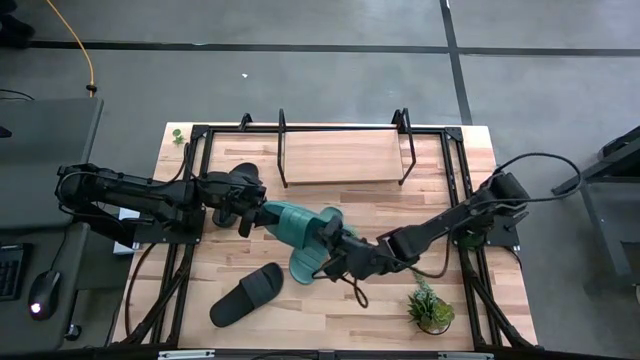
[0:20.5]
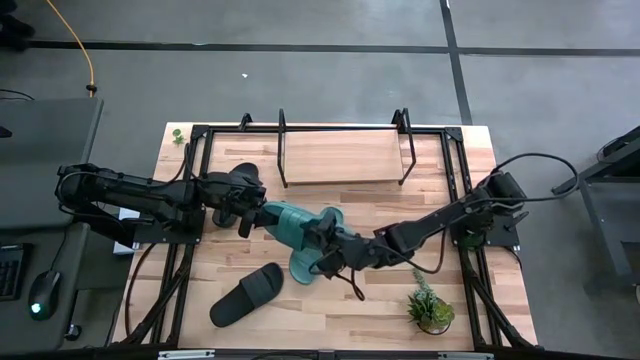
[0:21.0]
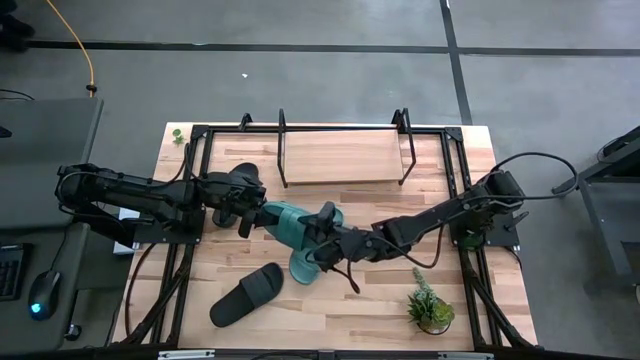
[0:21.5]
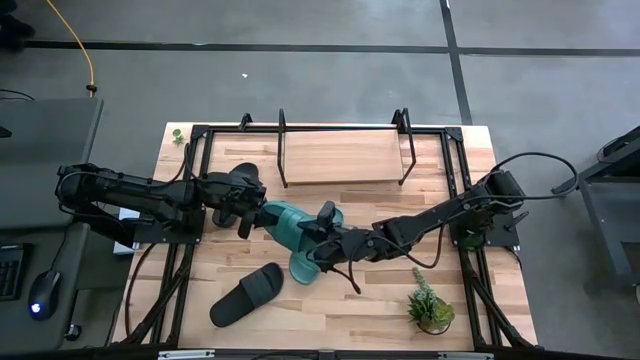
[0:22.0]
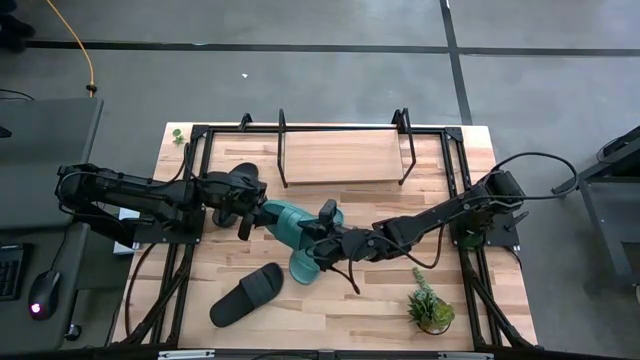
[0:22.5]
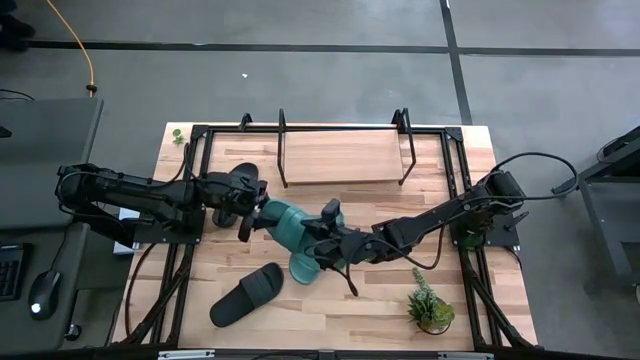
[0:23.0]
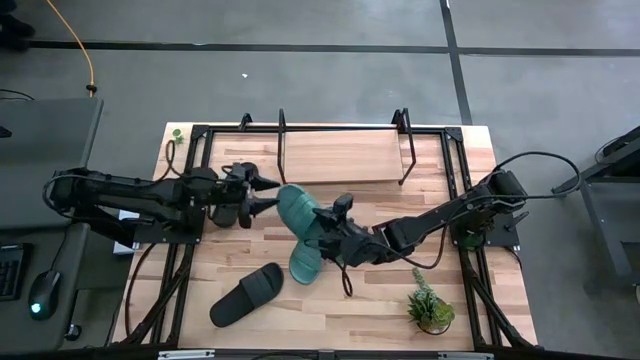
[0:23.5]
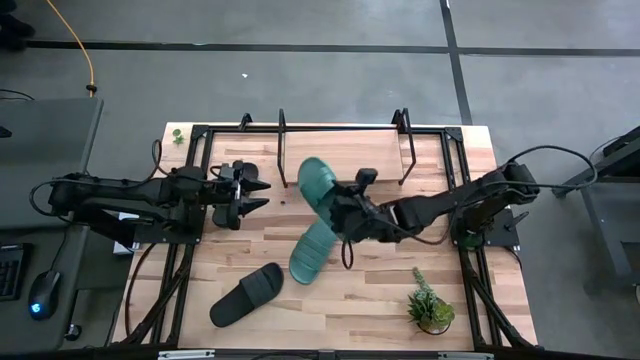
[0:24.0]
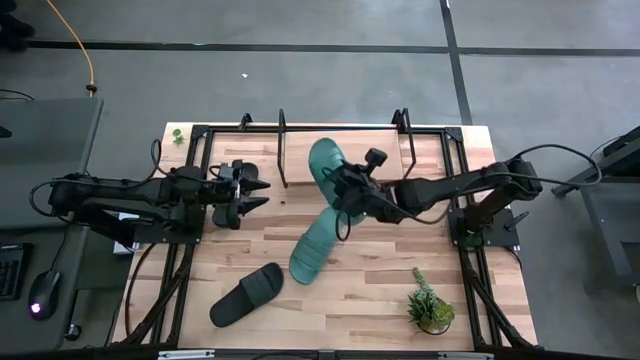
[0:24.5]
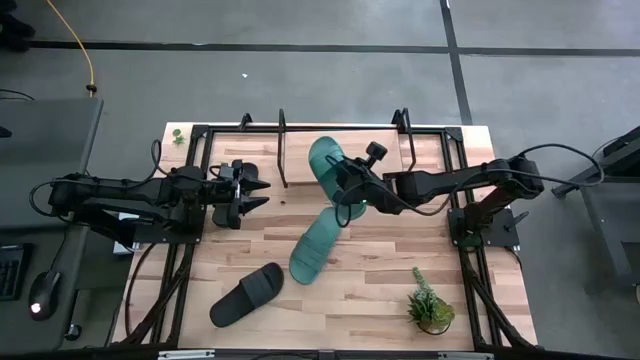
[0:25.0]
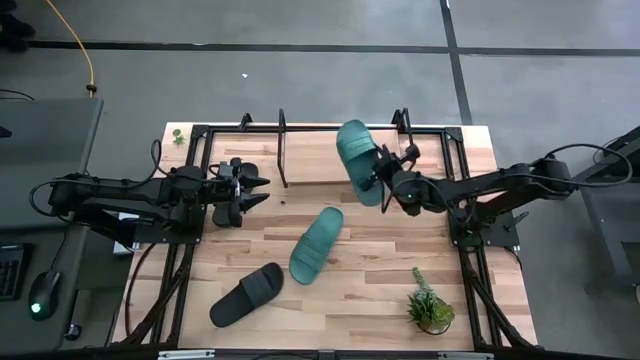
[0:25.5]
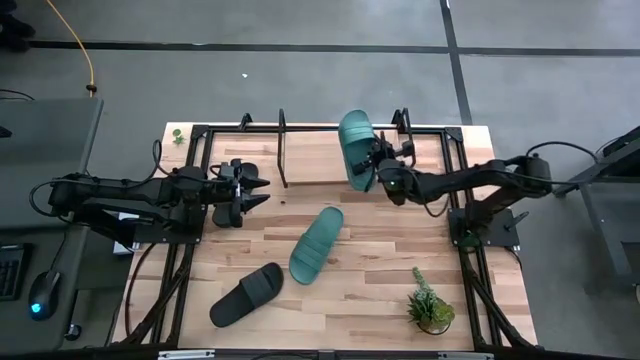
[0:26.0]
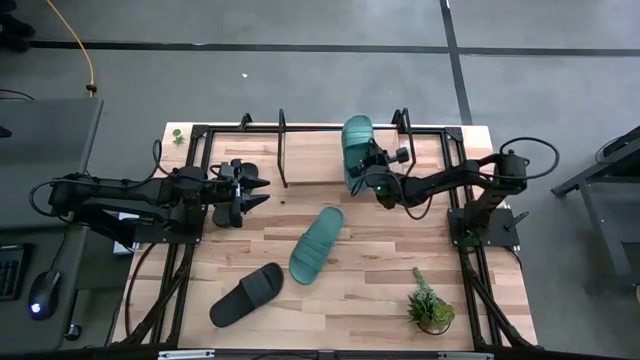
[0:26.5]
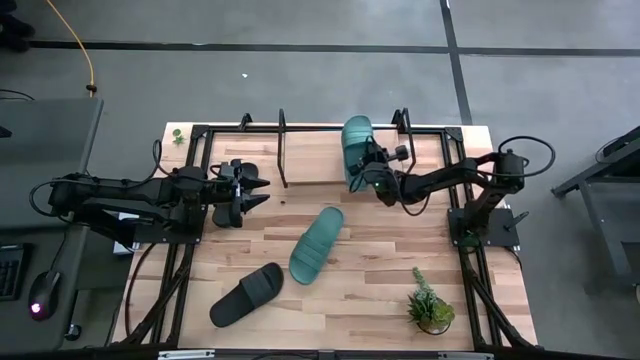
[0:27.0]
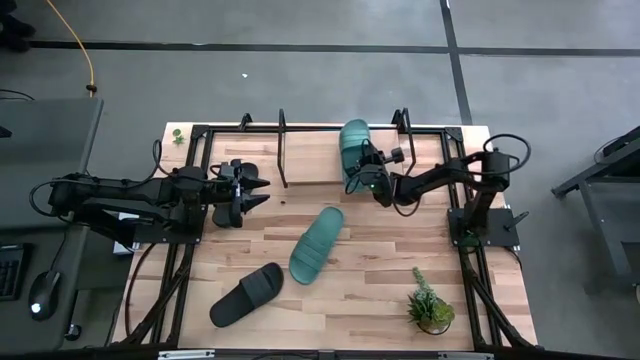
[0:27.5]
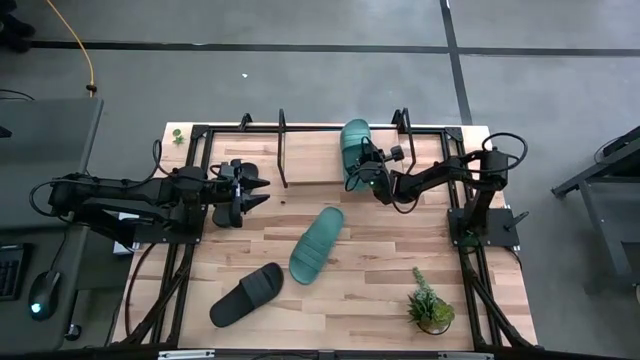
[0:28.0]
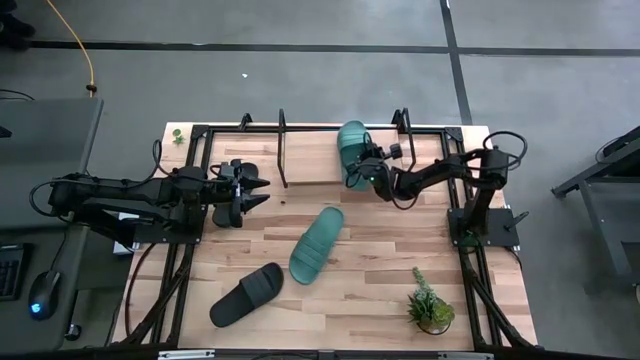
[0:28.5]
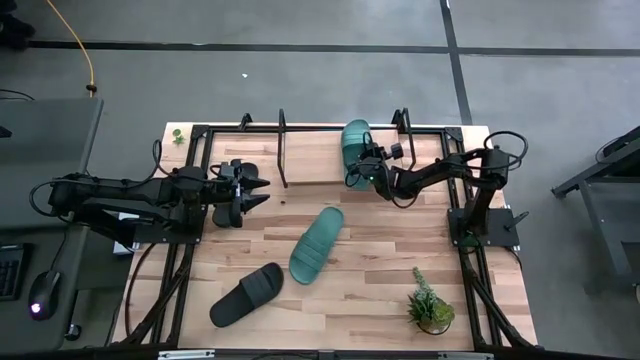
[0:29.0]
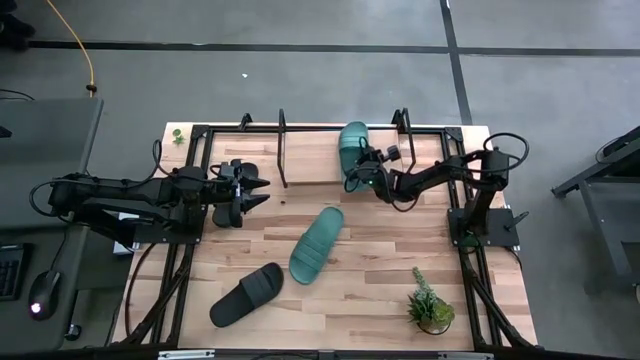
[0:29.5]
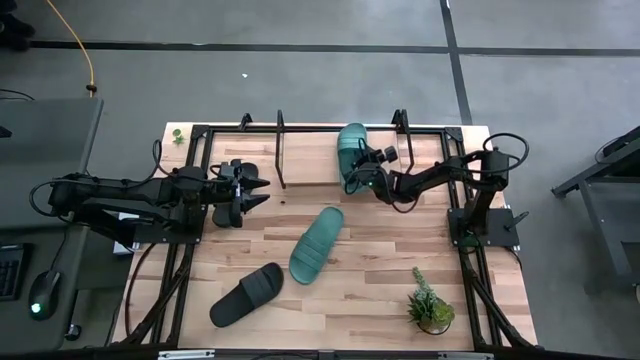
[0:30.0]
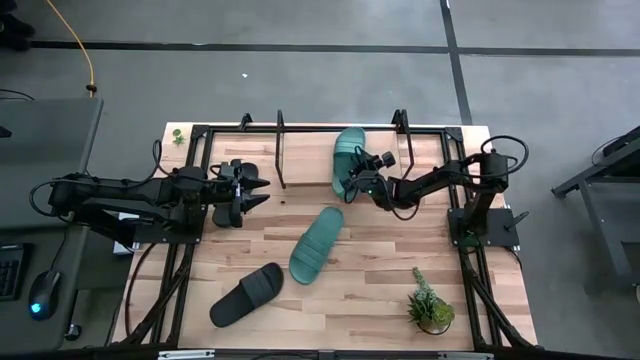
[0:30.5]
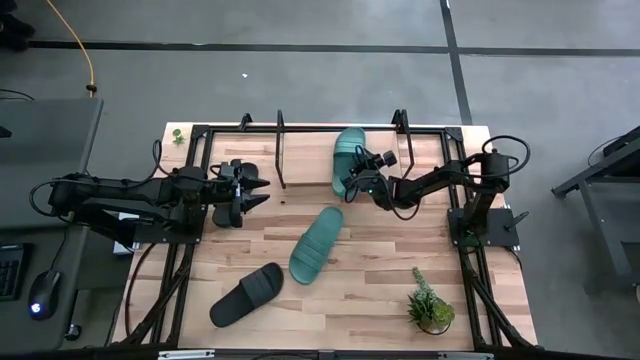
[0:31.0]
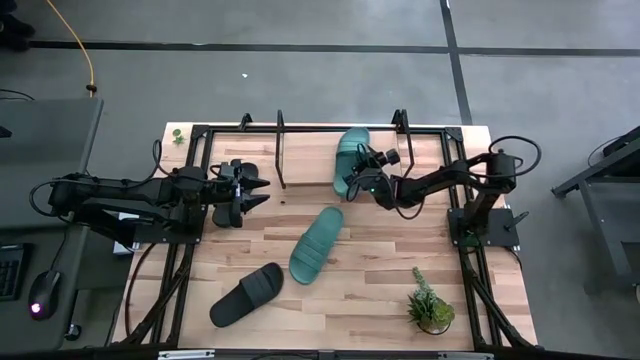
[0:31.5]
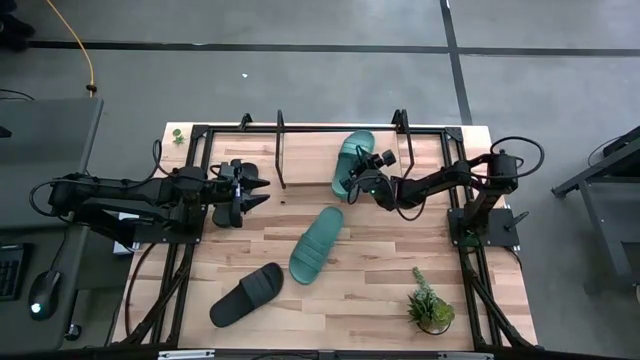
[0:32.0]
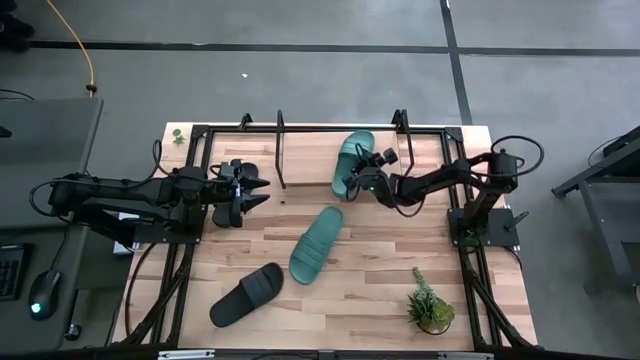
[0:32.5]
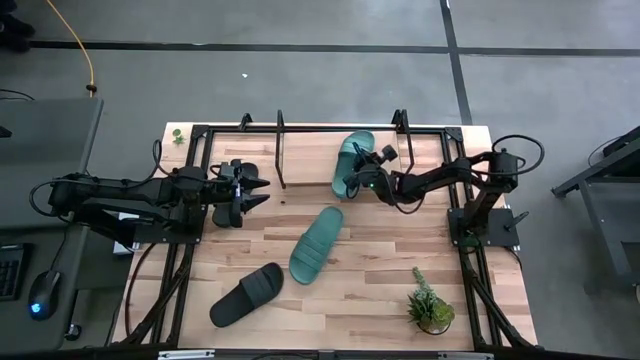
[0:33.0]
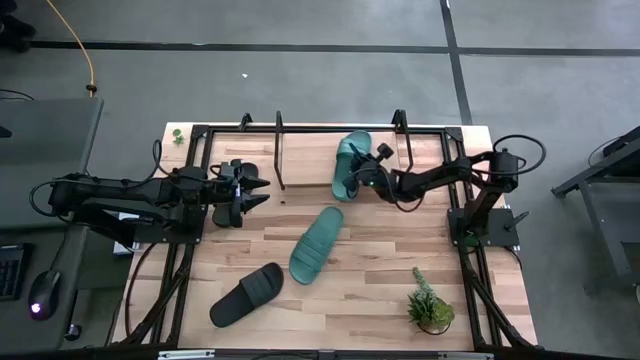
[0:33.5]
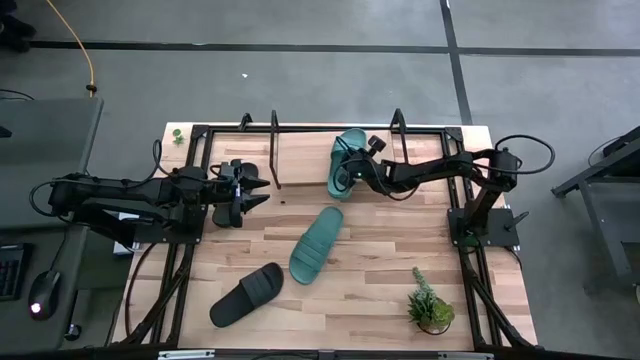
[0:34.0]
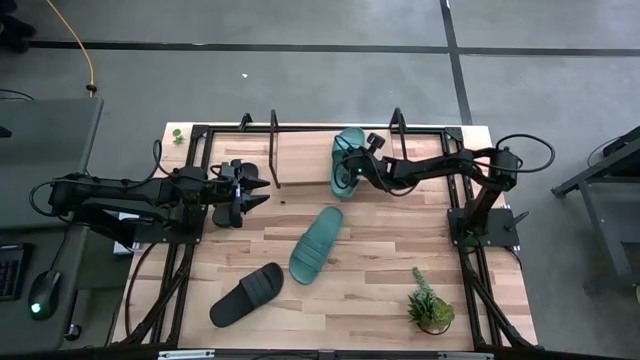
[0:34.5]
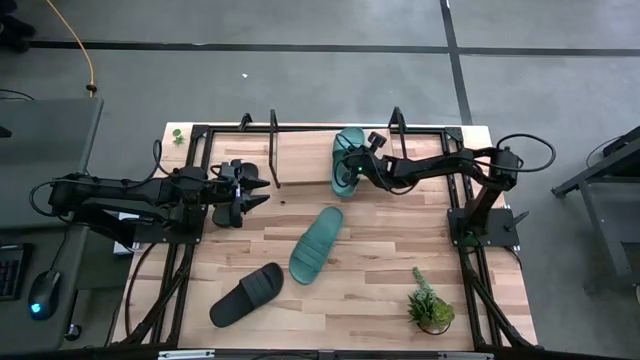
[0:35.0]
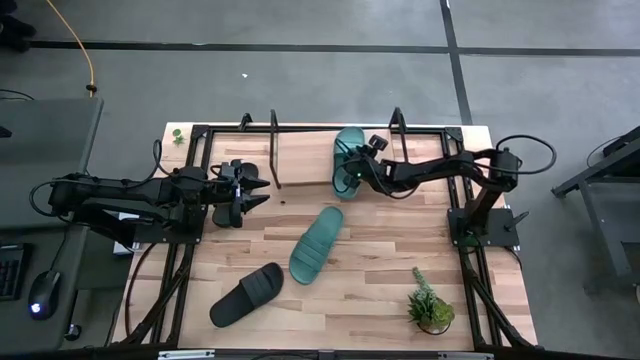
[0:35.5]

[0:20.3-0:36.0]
Task: Pick and place slides into the shelf
Put the bottom green slipper on the shelf

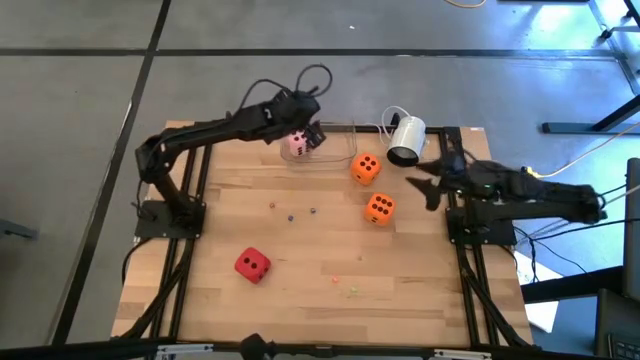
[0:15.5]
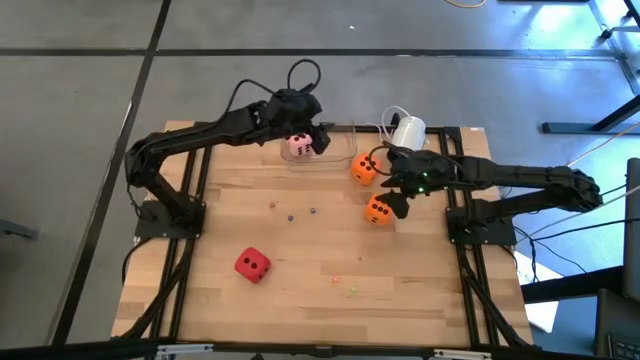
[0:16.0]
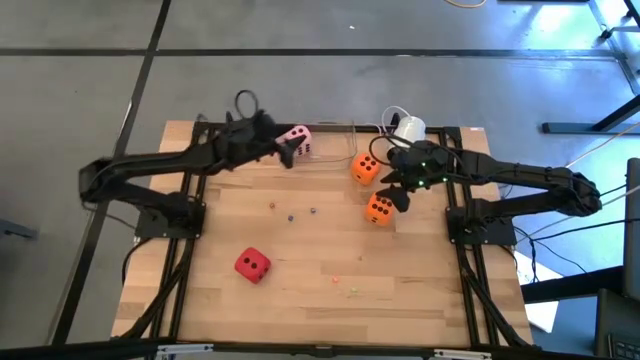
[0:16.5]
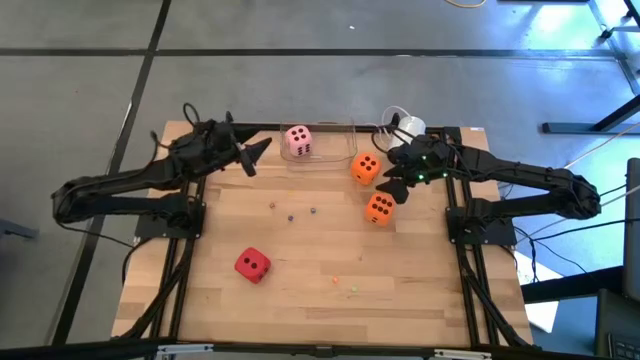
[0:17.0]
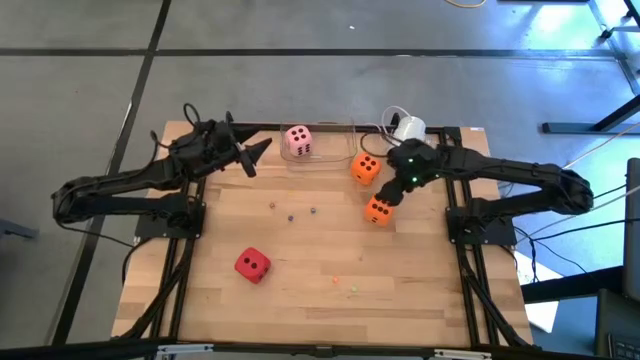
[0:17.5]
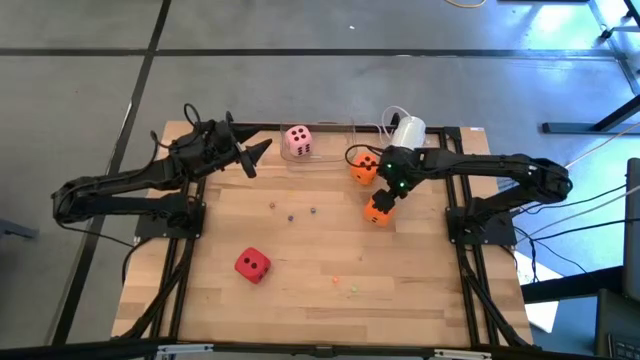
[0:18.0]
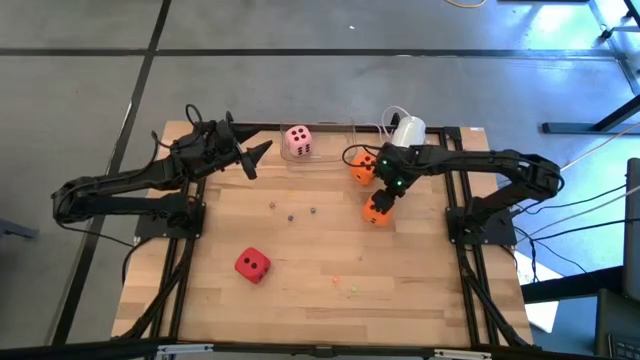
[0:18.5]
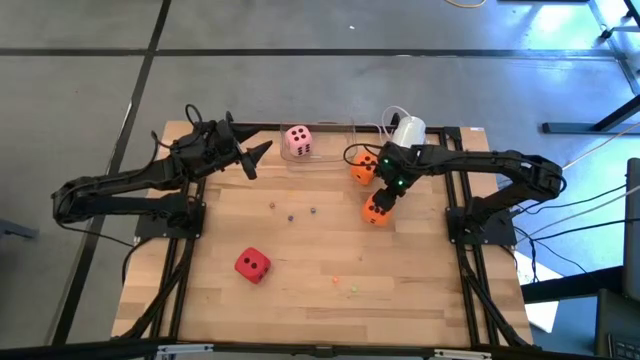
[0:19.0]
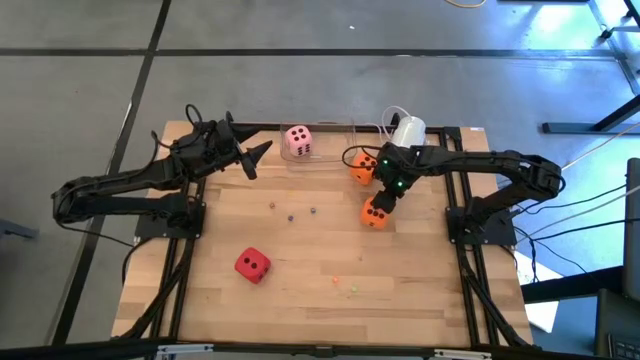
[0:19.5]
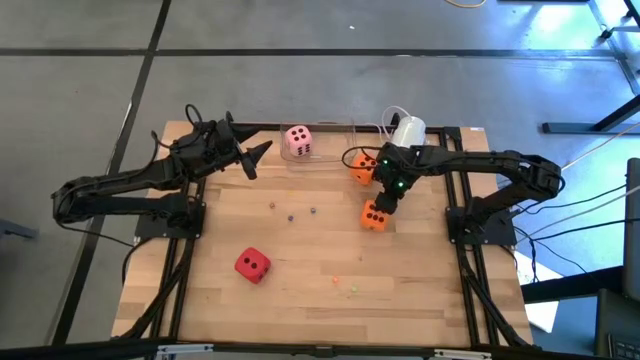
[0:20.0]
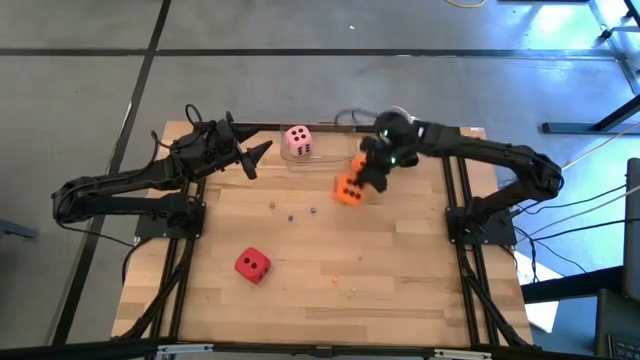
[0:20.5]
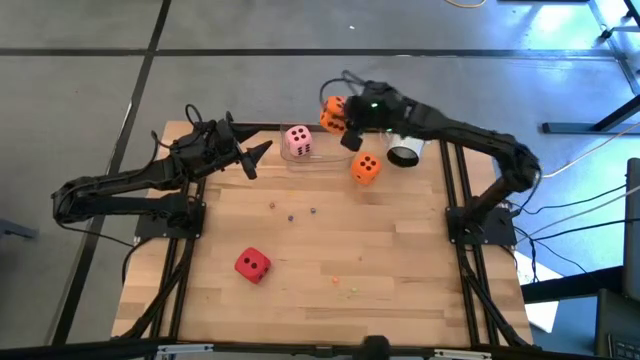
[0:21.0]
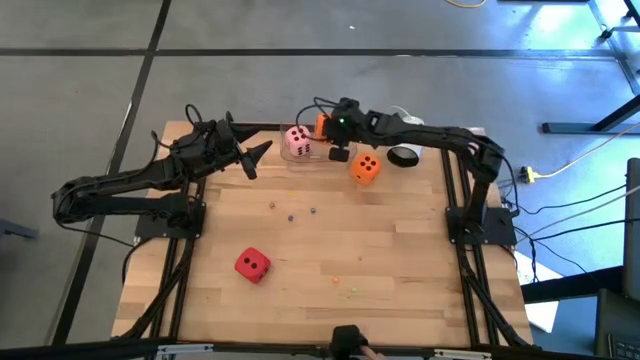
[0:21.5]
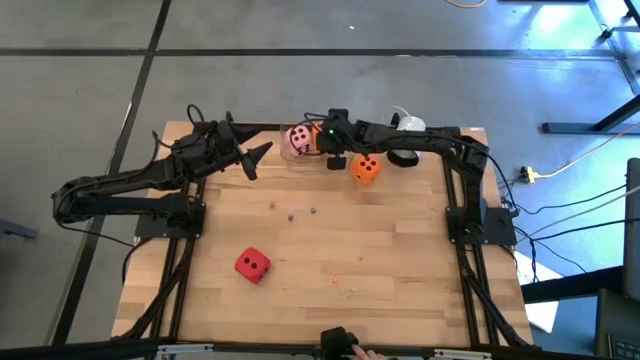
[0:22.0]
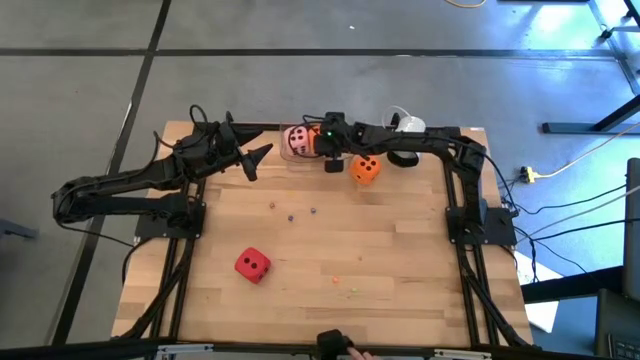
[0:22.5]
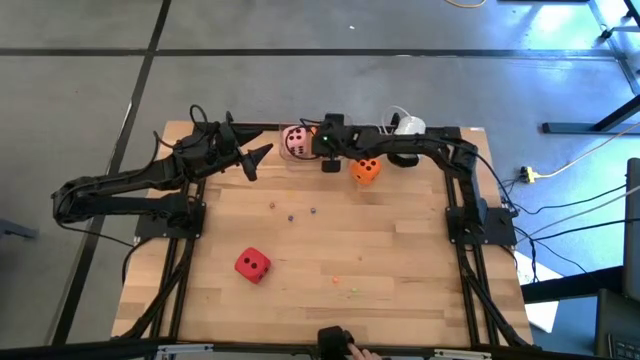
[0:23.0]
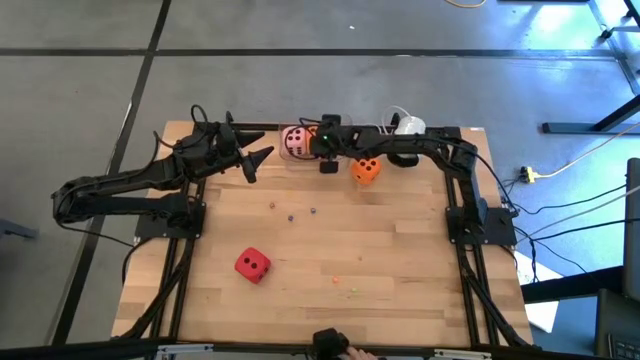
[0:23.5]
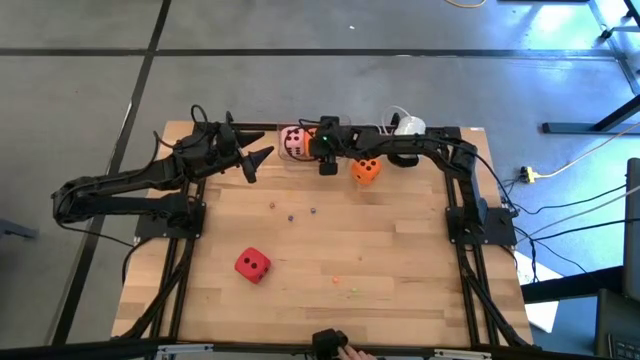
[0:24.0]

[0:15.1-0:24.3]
Task: Pick & Place Dice
Put the large orange dice into the transparent bin
